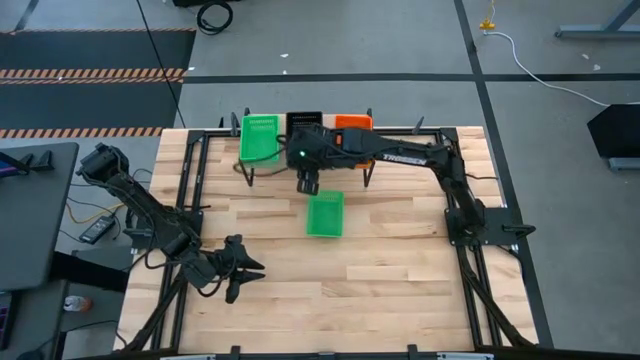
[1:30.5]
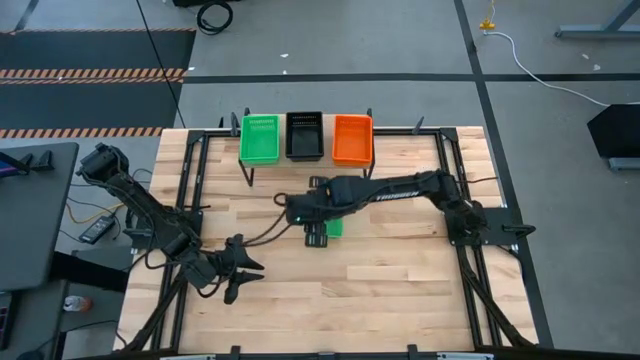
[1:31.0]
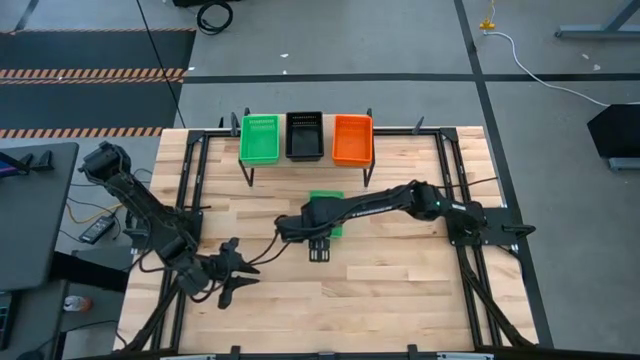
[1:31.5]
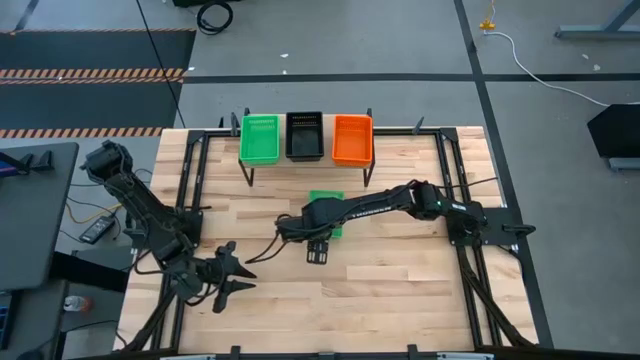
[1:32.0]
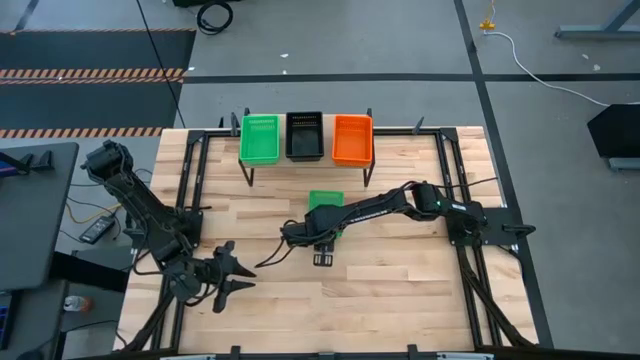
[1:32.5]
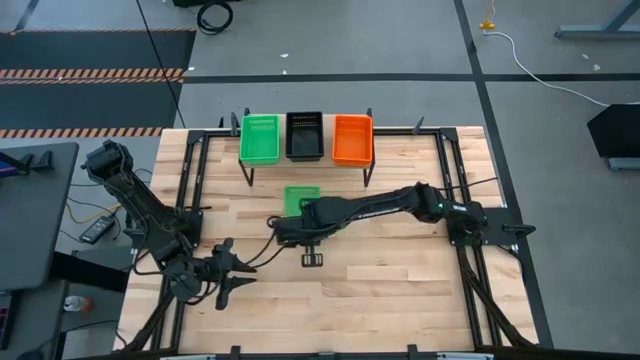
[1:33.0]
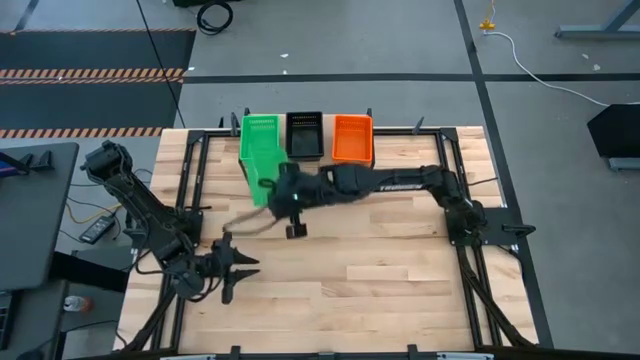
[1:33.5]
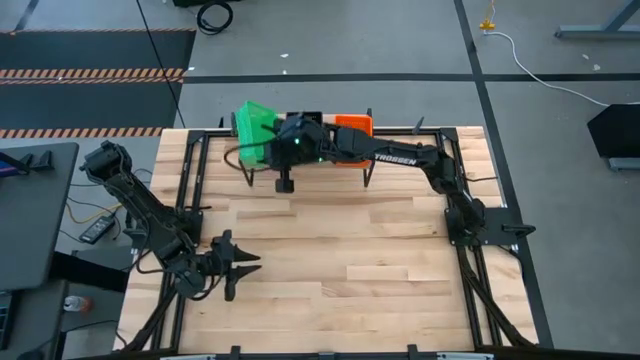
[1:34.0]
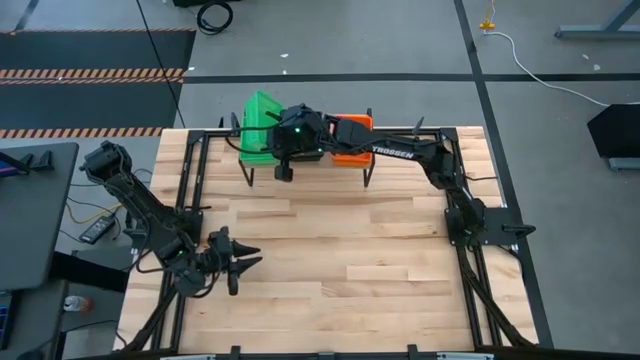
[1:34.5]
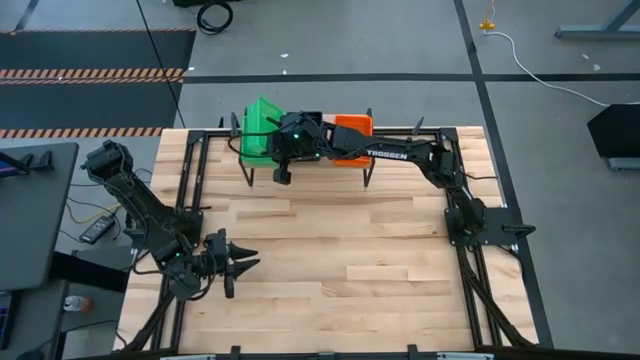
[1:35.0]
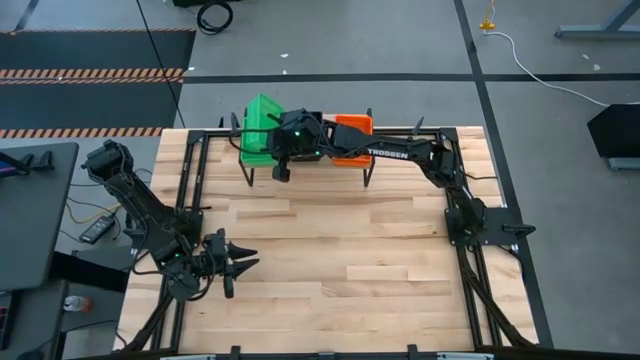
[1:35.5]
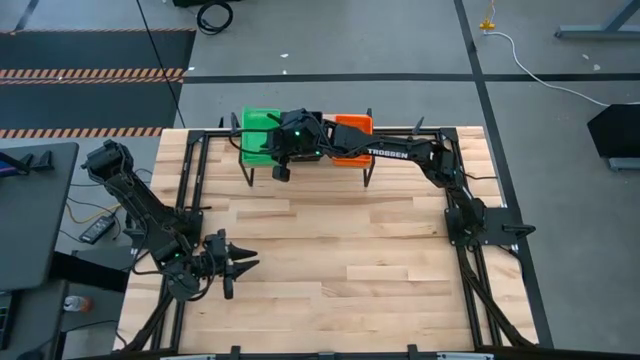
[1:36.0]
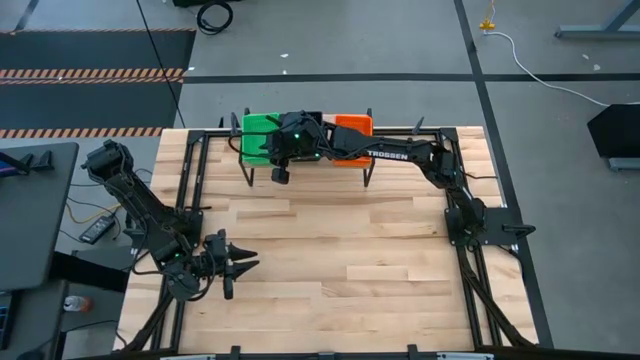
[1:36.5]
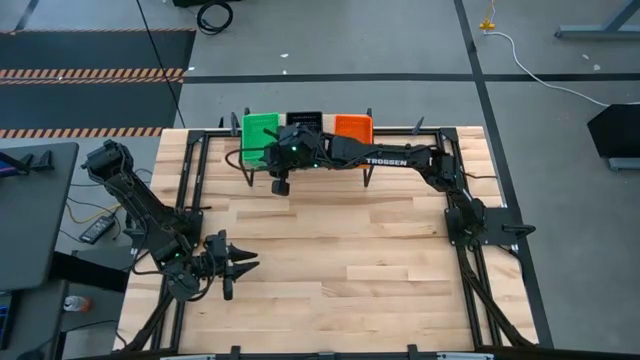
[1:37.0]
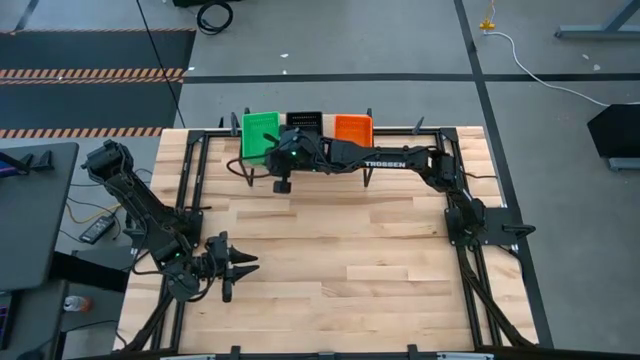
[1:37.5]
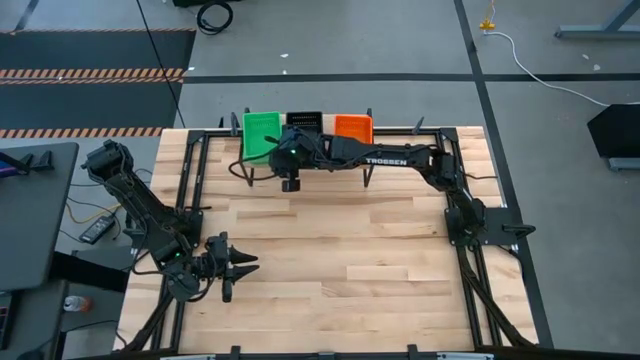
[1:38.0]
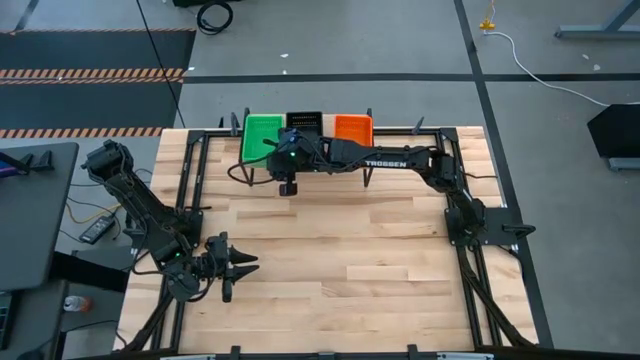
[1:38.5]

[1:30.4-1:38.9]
Task: Stack baskets on shelf by color
Stack the green bin on top of the green bin on the shelf

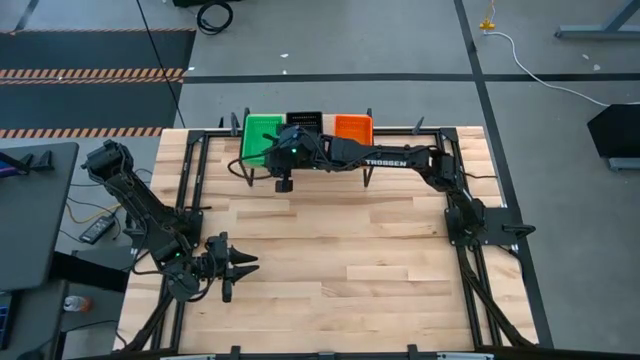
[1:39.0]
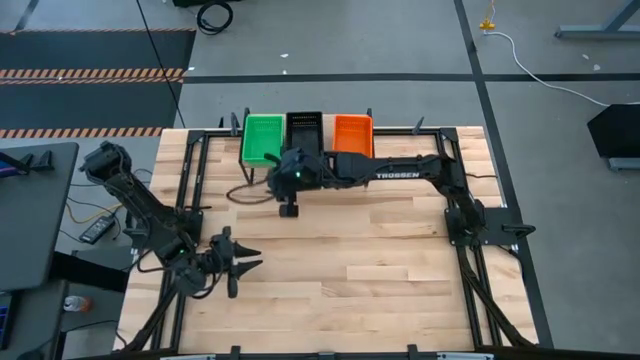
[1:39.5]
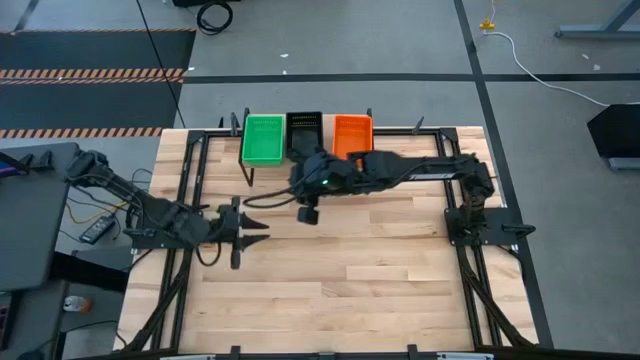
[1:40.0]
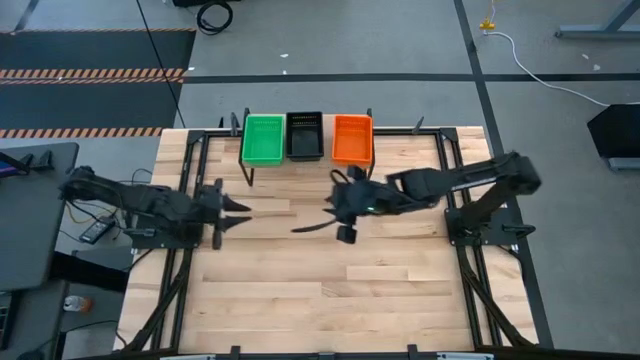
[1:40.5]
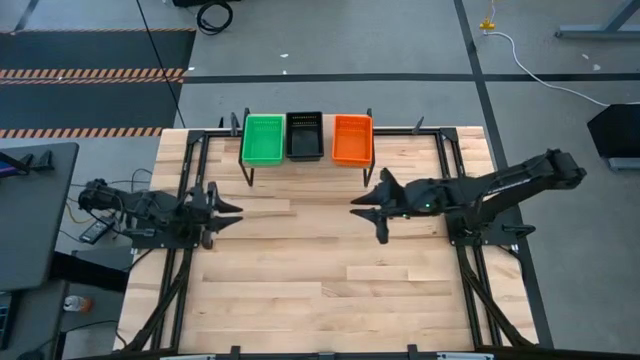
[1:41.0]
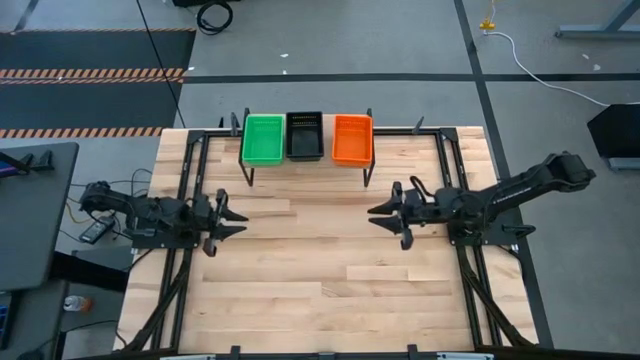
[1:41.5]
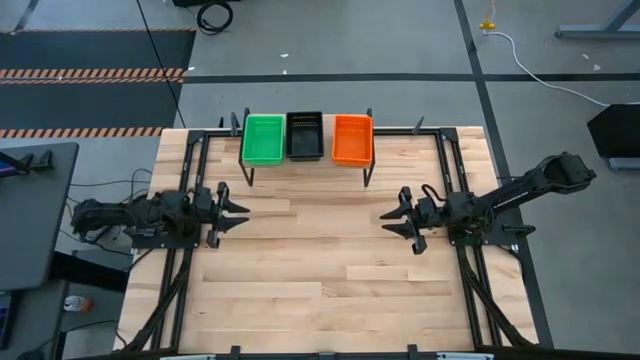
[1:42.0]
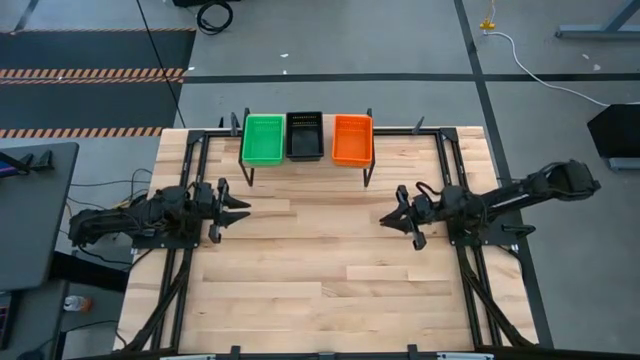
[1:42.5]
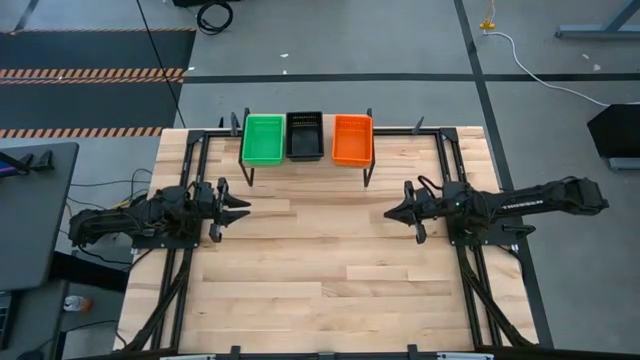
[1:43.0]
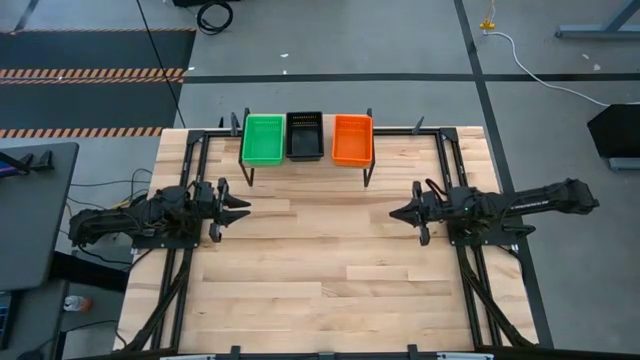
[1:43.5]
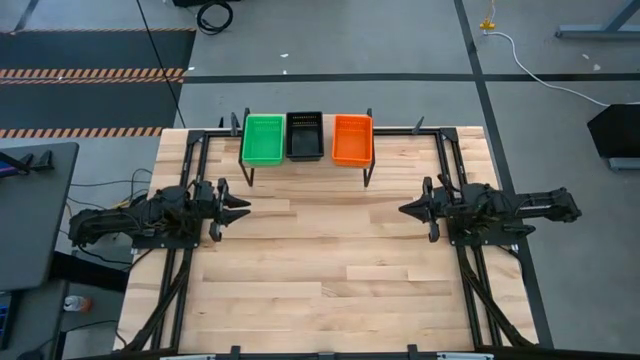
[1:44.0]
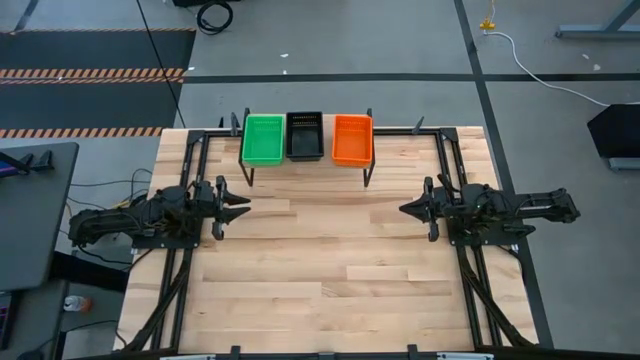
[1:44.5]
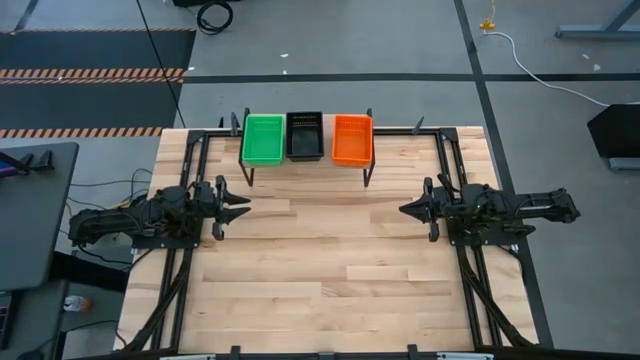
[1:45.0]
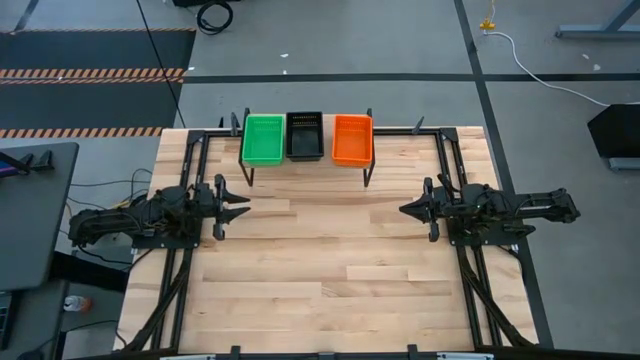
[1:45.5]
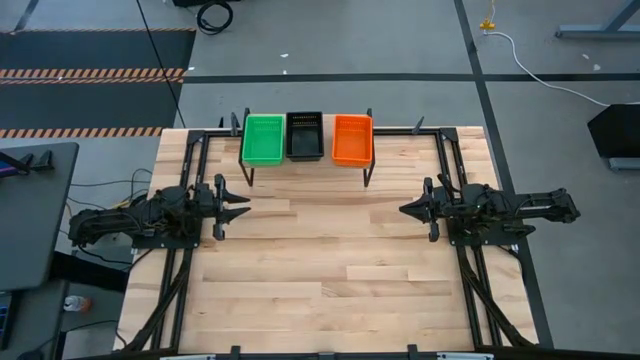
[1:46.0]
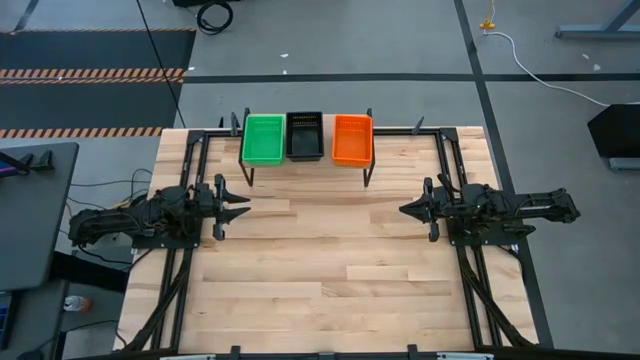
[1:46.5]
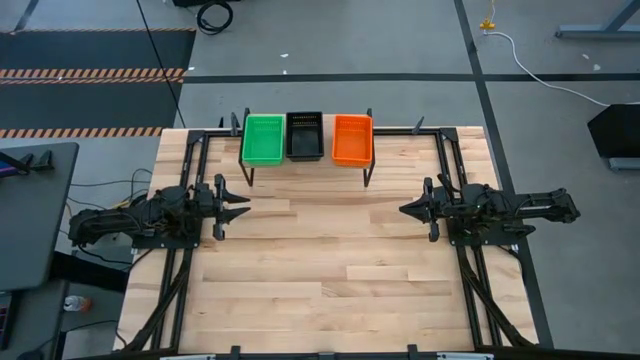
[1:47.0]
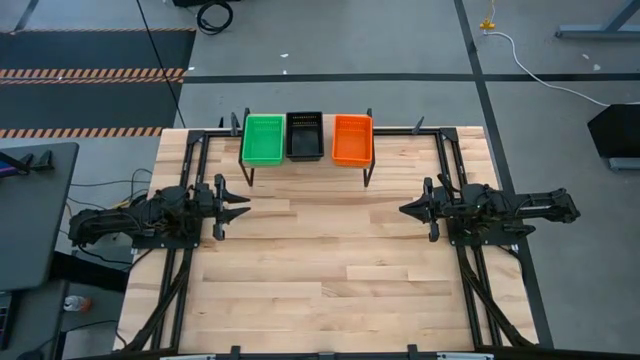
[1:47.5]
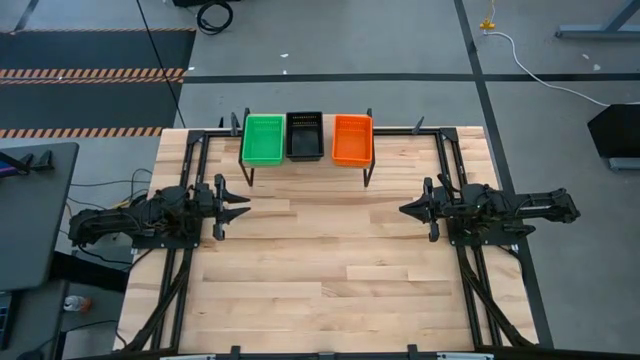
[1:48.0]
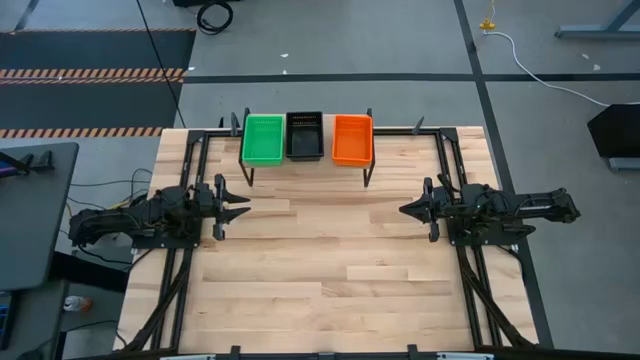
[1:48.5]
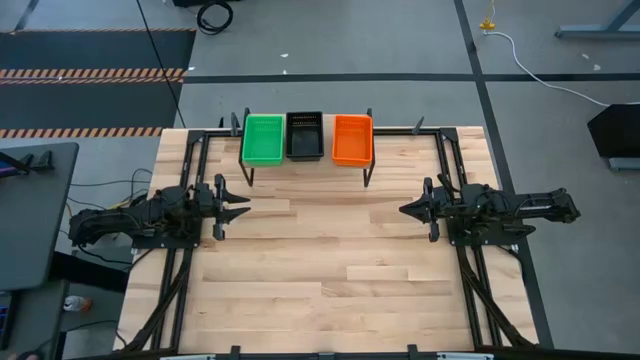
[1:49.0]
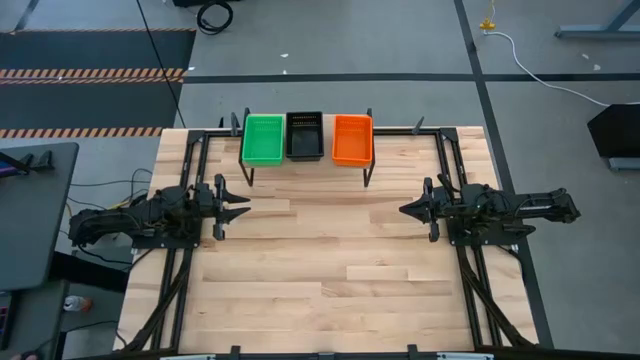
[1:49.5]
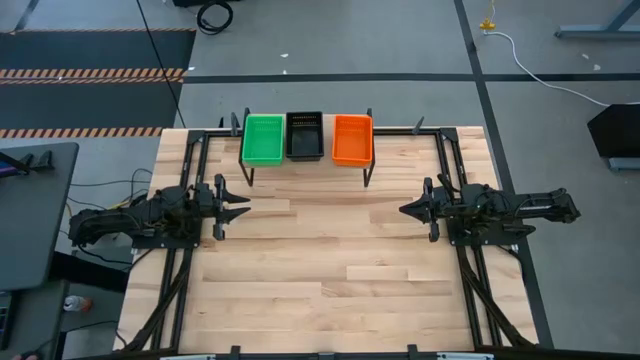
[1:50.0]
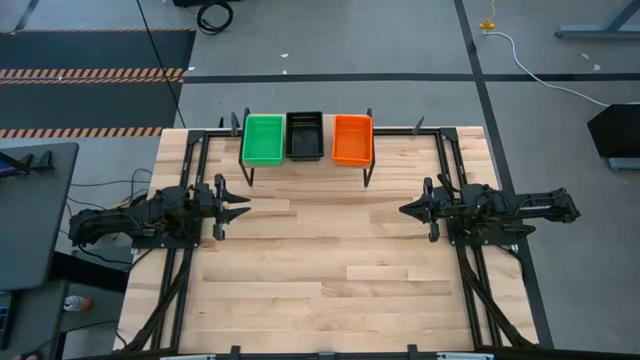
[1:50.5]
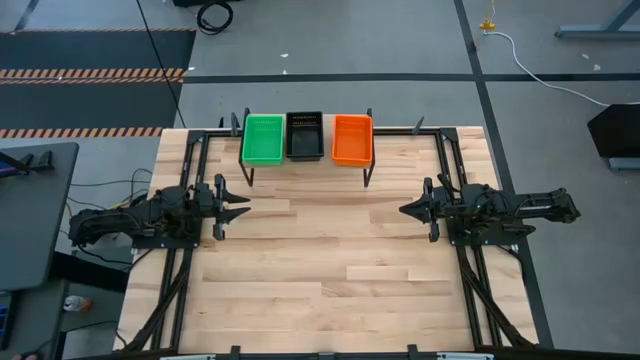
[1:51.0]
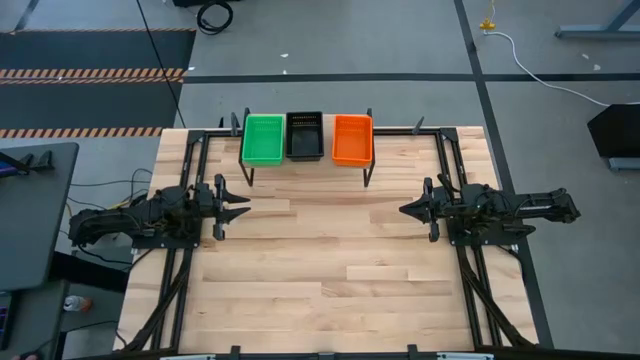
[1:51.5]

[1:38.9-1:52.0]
Return to Home Position
